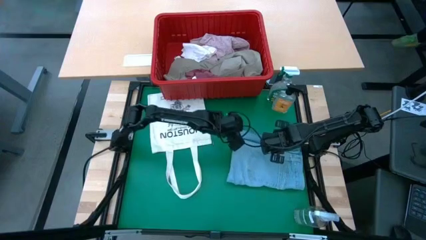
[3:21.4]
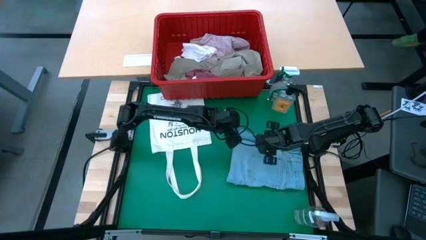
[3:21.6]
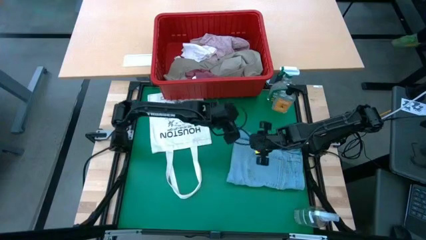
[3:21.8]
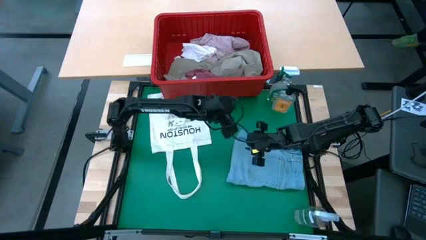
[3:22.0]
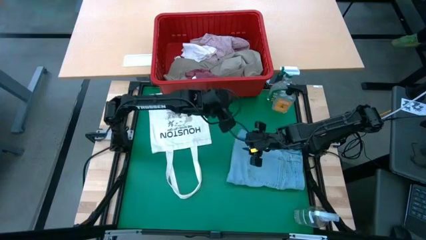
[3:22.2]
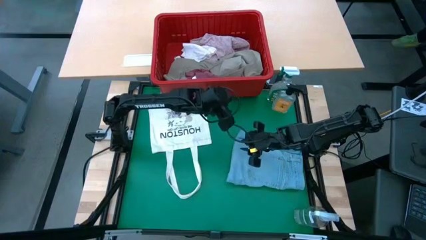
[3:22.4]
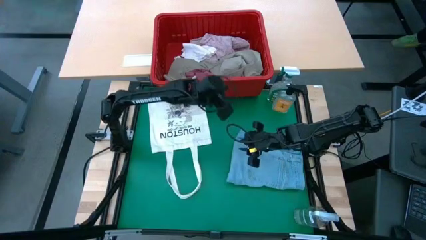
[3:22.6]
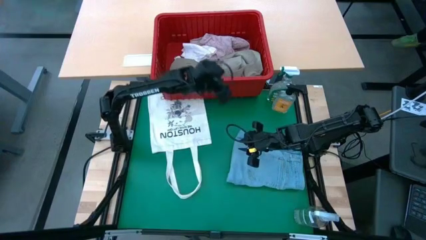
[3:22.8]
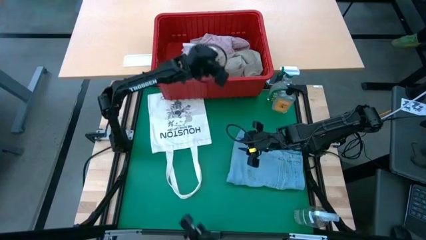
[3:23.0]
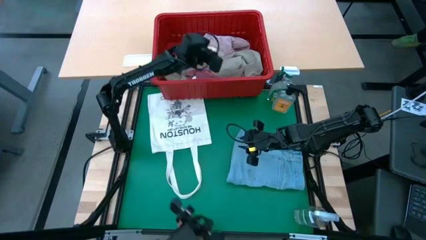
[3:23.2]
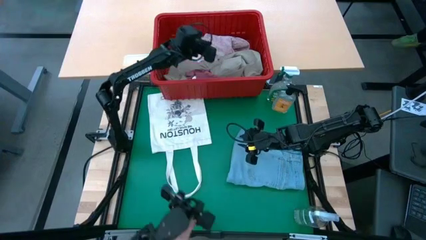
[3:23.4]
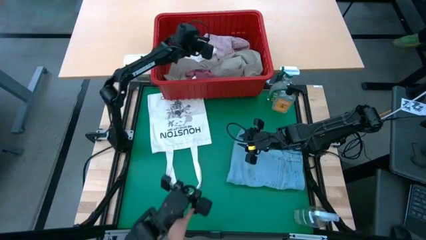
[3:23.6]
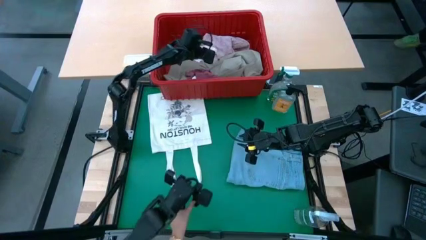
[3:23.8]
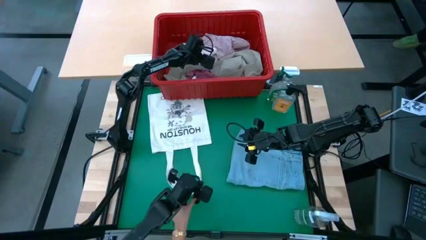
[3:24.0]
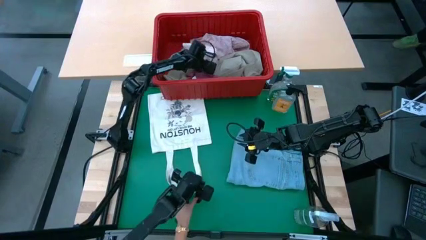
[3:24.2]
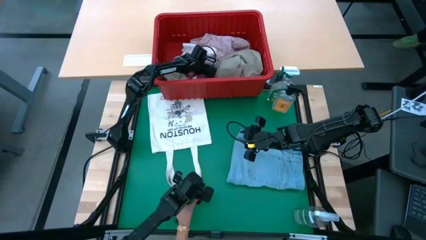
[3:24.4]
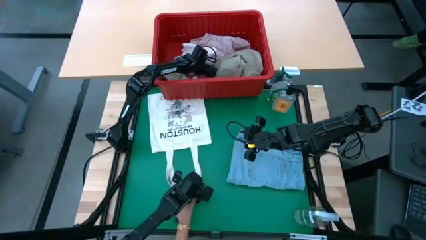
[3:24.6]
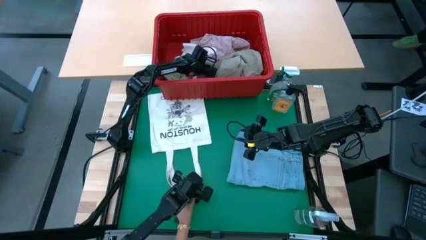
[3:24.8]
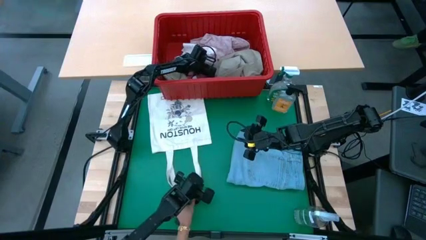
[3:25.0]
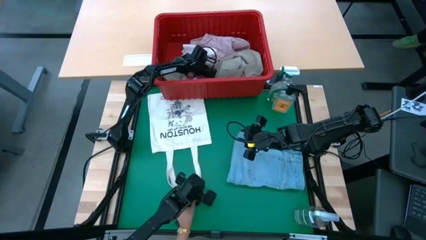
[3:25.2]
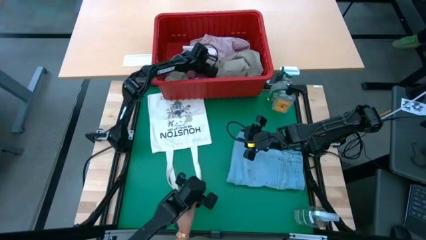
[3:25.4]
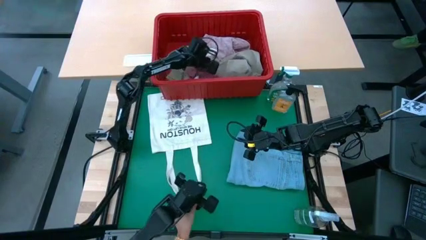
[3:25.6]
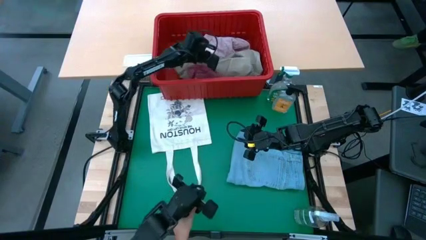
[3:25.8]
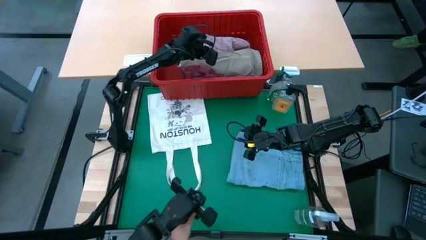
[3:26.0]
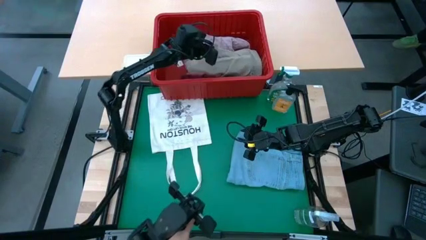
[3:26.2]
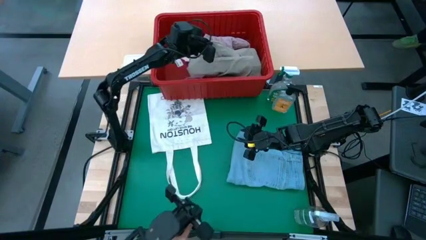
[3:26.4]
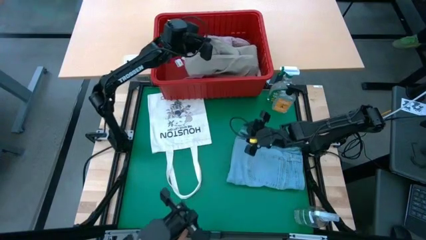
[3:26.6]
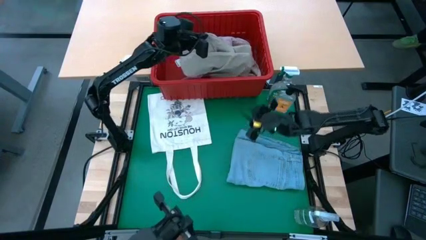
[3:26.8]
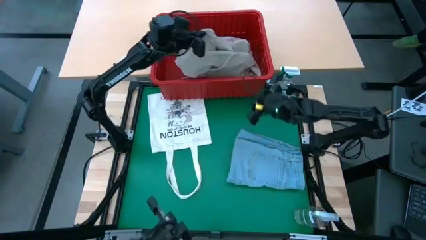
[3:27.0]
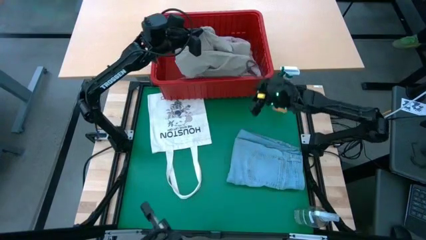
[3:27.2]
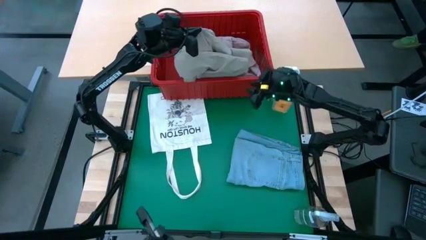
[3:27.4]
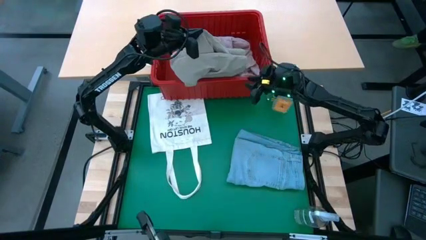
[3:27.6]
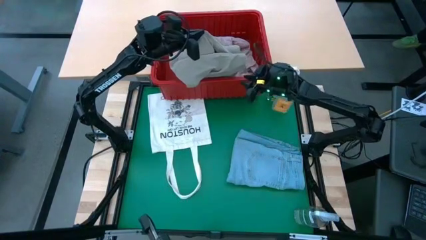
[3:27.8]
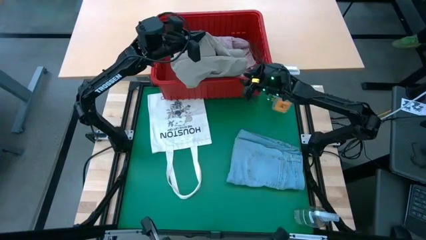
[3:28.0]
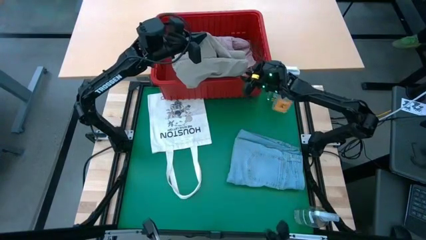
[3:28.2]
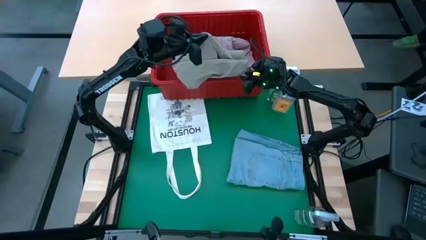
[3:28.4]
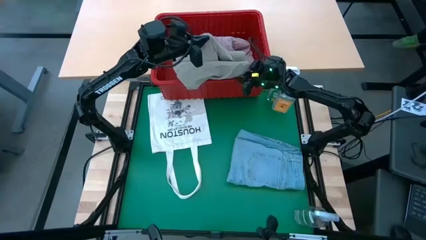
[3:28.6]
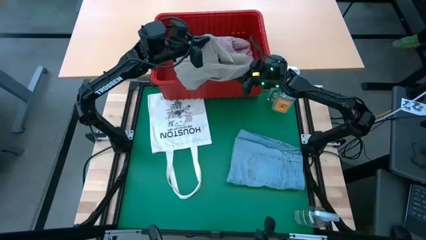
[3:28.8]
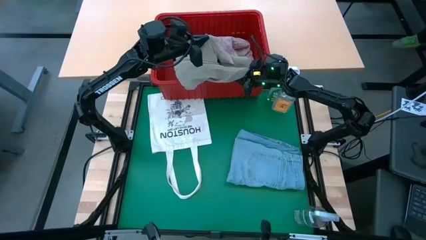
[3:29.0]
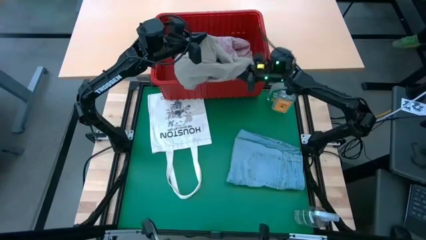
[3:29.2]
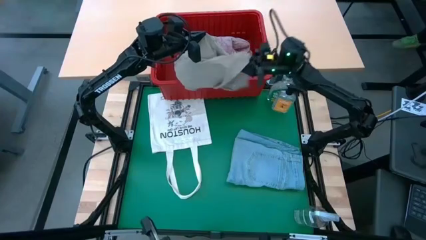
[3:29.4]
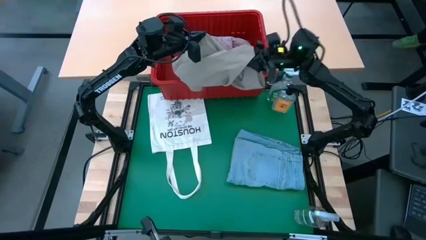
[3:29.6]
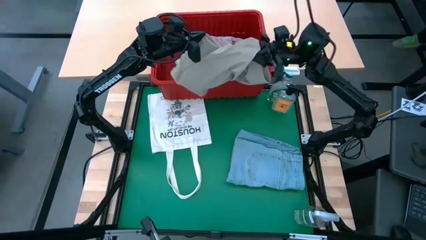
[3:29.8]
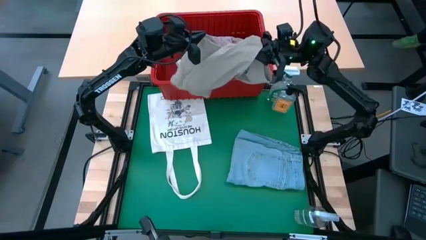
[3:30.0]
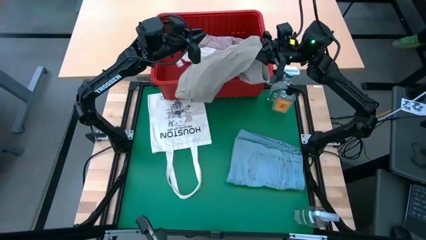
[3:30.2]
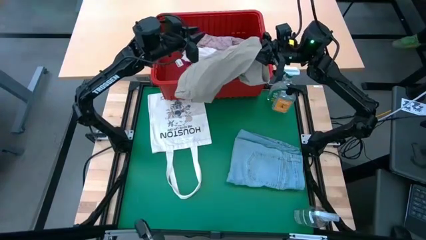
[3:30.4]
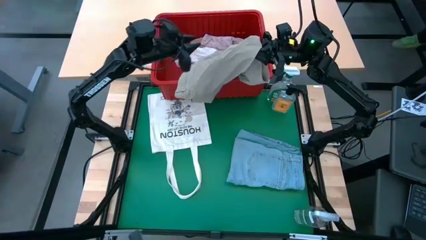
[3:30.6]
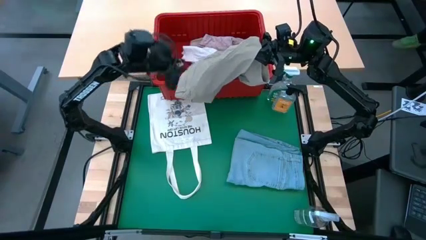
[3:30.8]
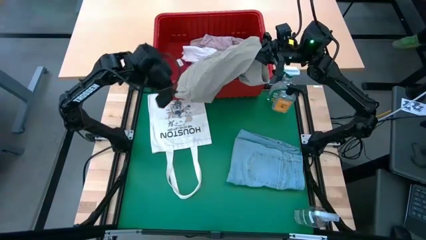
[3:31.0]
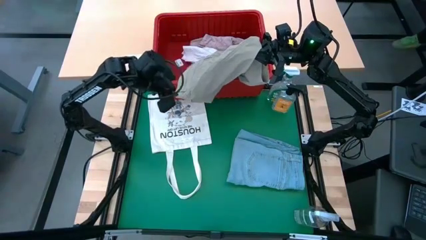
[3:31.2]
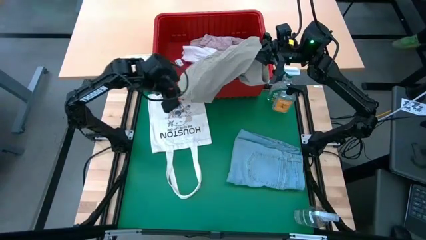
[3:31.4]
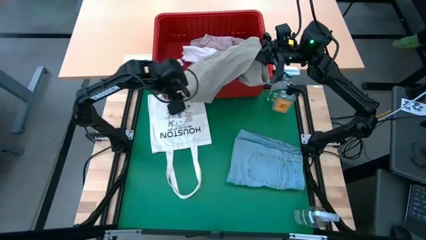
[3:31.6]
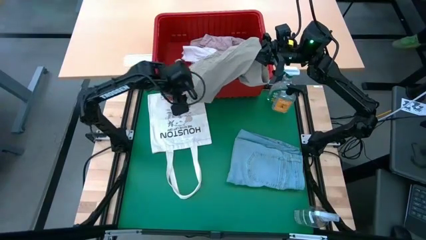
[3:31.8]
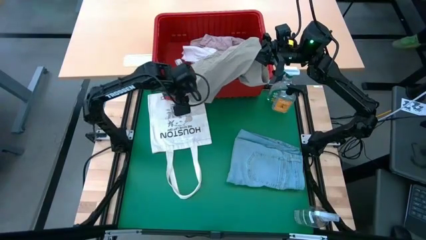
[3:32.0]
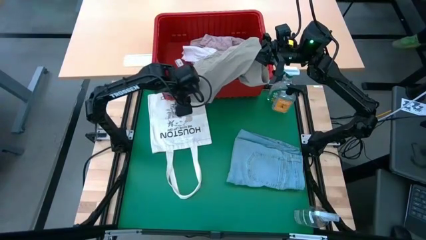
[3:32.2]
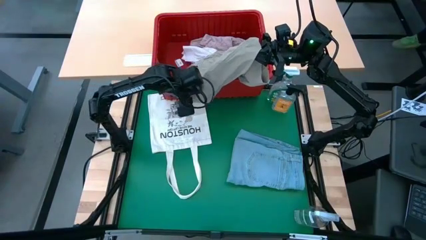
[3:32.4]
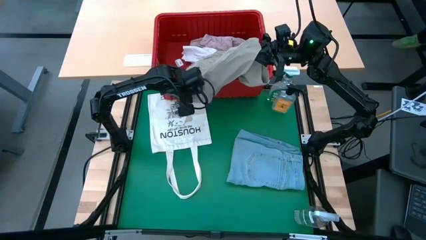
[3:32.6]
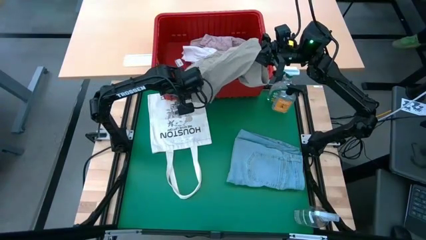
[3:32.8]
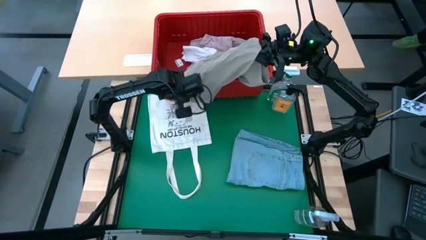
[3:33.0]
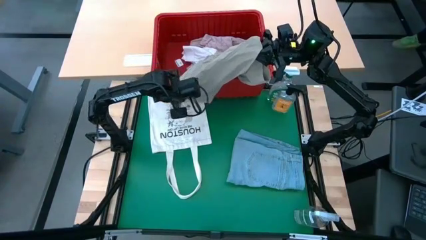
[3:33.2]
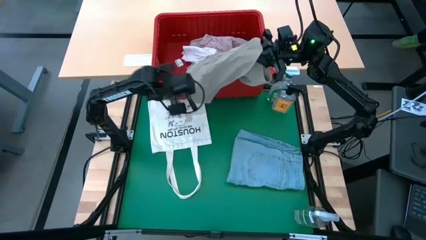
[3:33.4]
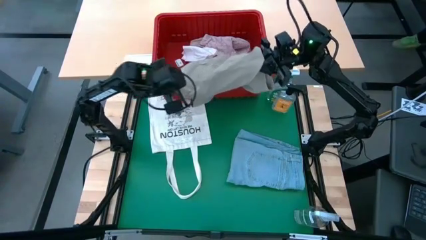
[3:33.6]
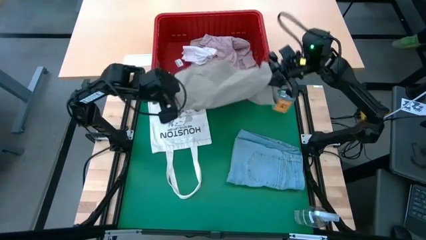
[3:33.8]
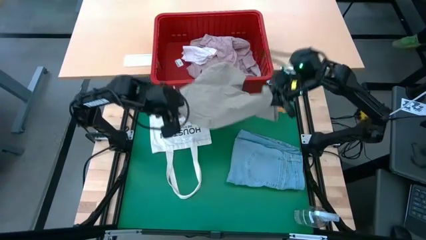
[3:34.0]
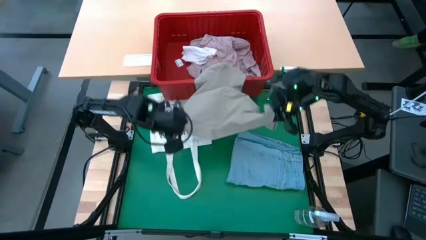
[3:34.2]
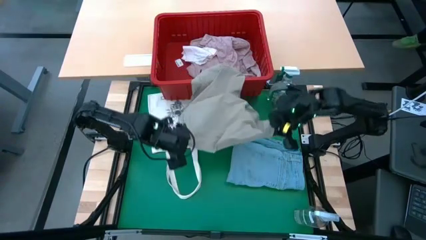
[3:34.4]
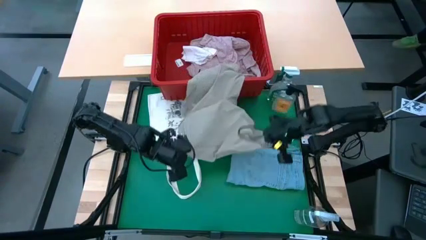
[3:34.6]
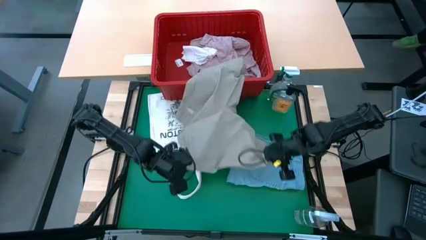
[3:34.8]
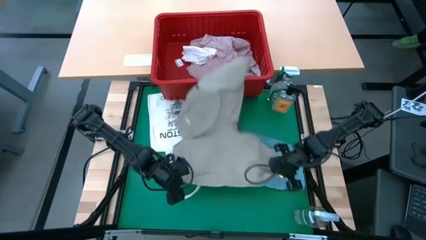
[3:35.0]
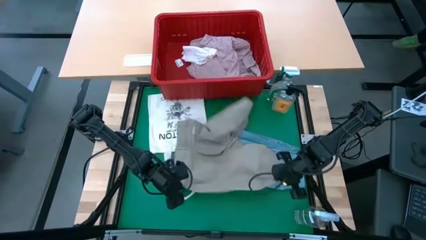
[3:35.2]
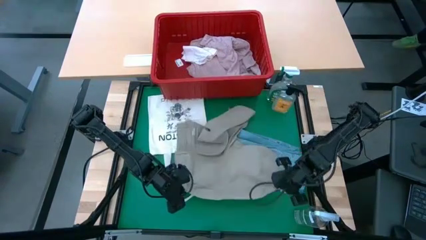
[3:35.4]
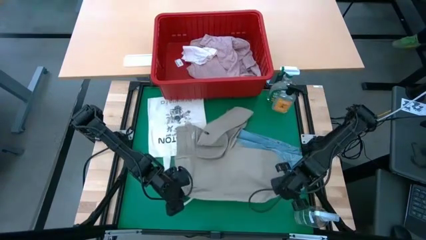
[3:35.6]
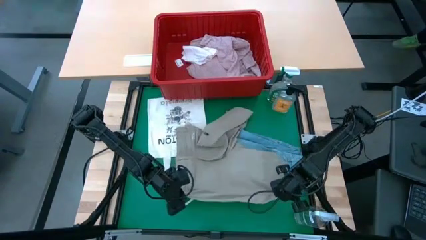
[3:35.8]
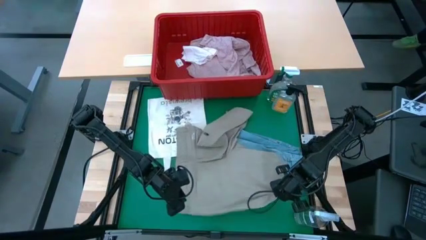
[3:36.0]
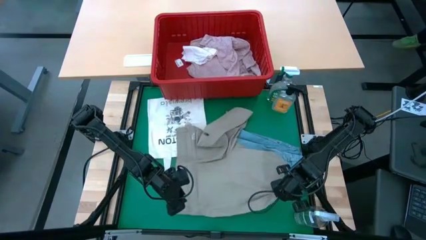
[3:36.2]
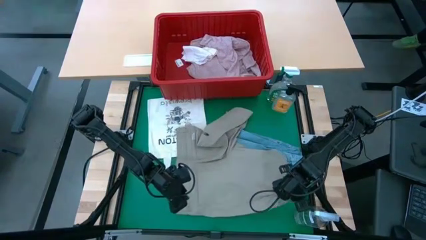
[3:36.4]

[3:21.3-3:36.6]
Task: Fold laundry
Remove the gray shorts from the red bin
